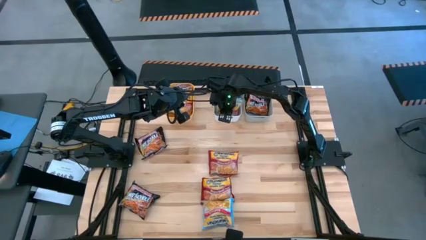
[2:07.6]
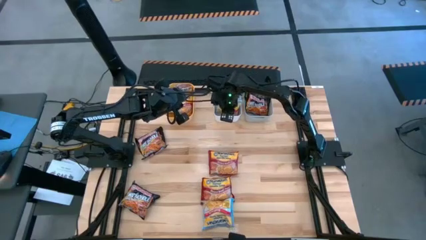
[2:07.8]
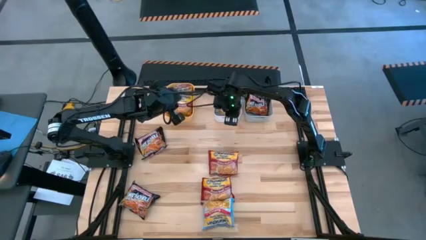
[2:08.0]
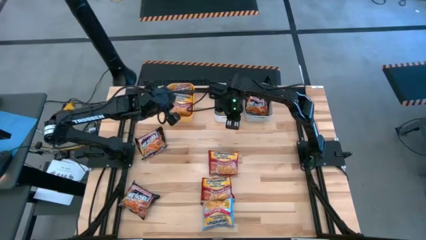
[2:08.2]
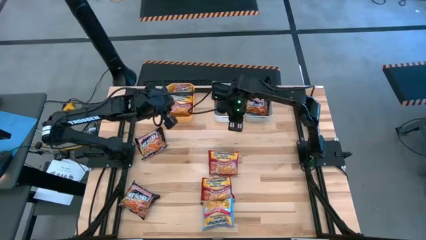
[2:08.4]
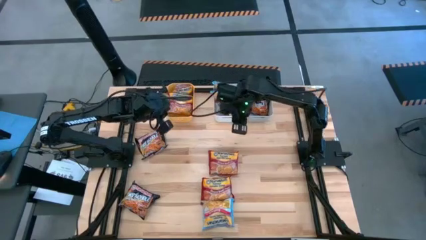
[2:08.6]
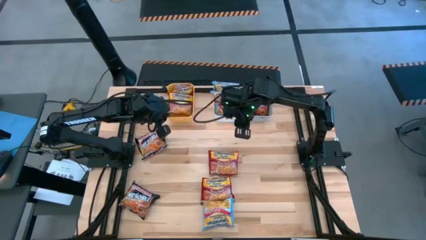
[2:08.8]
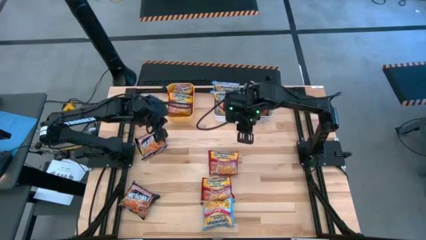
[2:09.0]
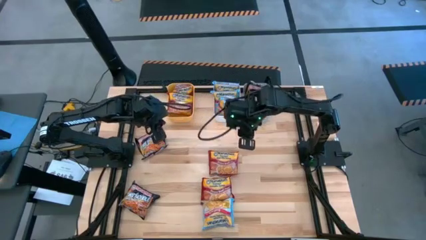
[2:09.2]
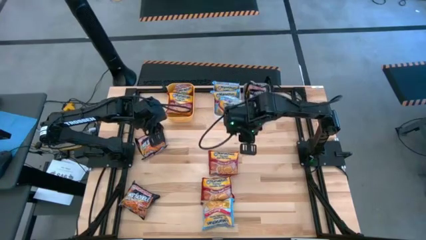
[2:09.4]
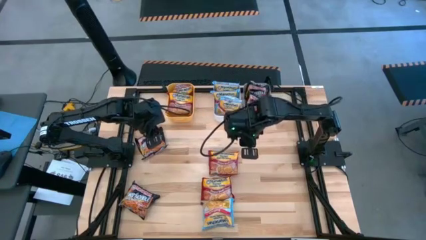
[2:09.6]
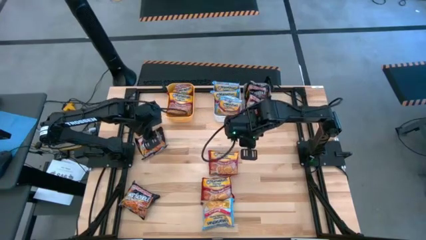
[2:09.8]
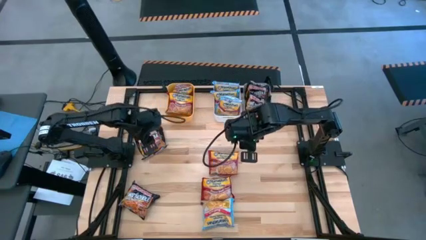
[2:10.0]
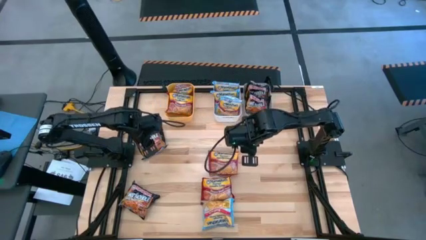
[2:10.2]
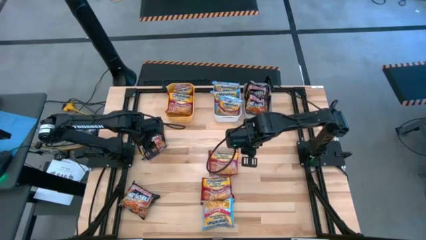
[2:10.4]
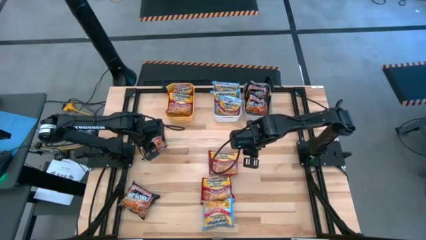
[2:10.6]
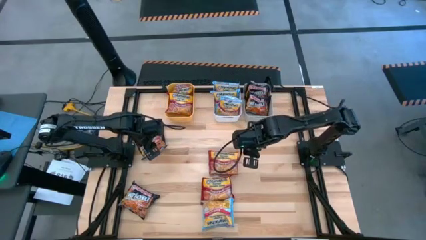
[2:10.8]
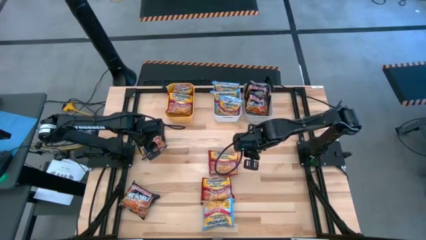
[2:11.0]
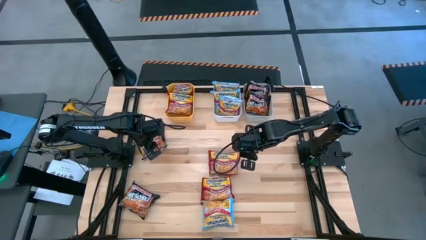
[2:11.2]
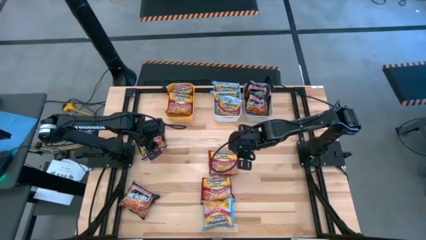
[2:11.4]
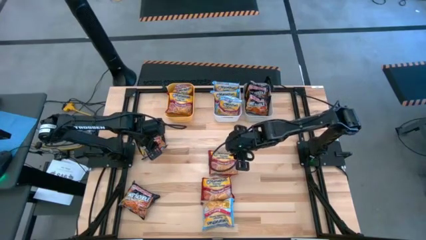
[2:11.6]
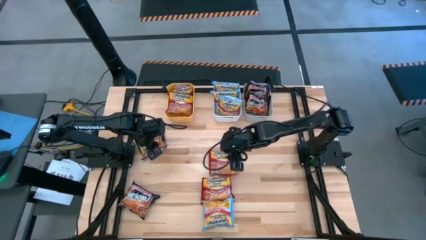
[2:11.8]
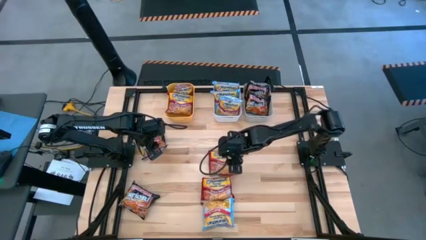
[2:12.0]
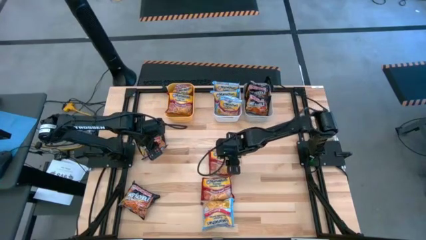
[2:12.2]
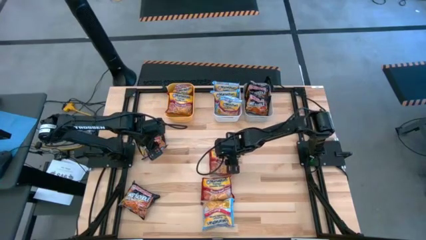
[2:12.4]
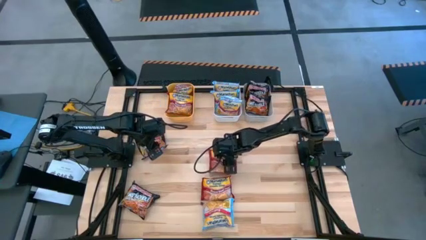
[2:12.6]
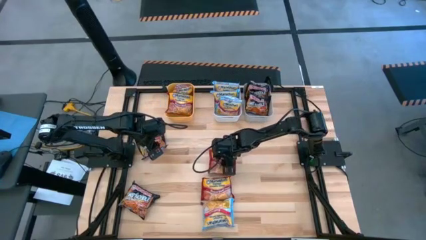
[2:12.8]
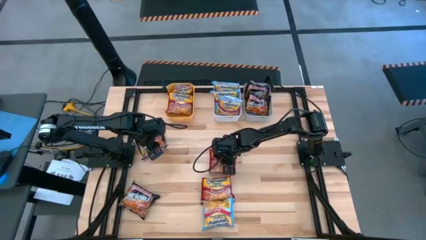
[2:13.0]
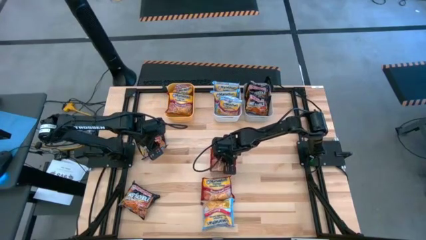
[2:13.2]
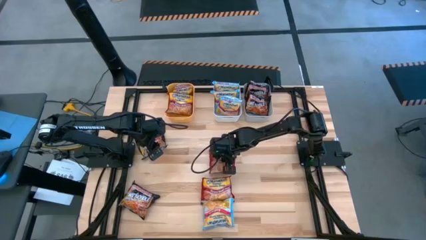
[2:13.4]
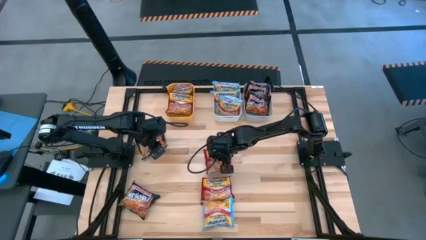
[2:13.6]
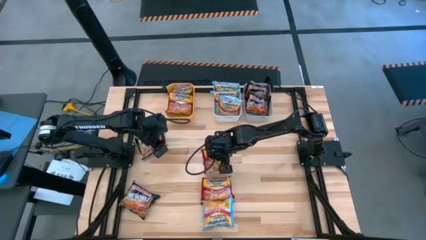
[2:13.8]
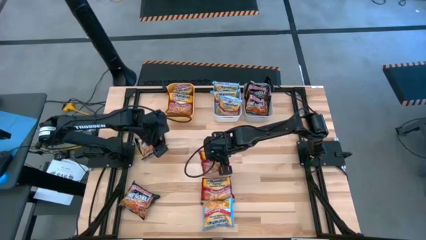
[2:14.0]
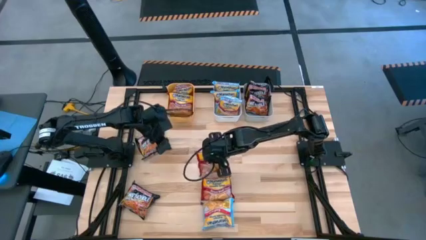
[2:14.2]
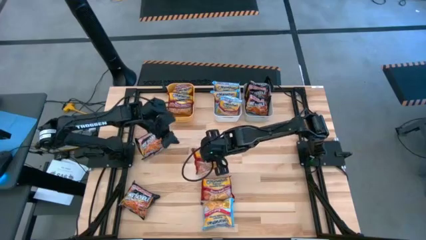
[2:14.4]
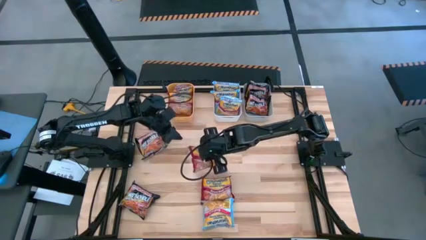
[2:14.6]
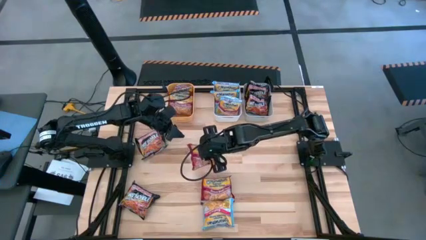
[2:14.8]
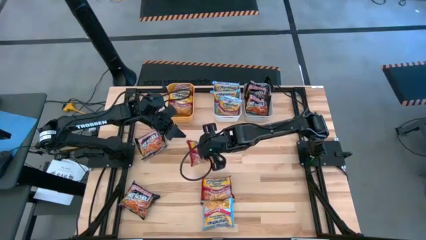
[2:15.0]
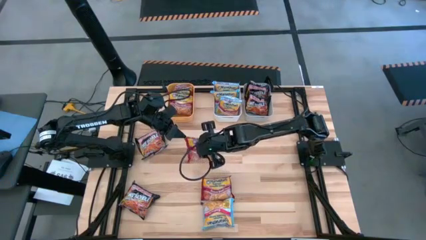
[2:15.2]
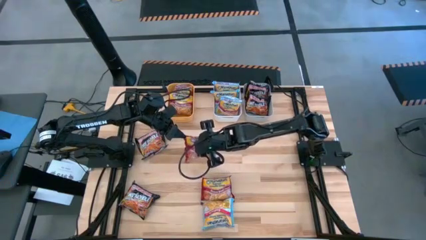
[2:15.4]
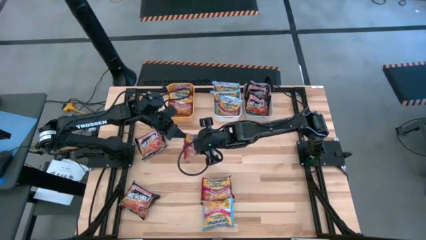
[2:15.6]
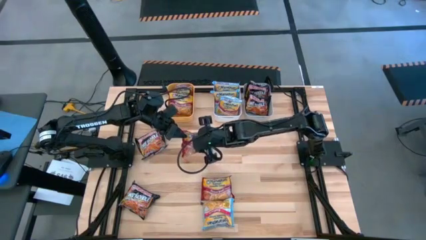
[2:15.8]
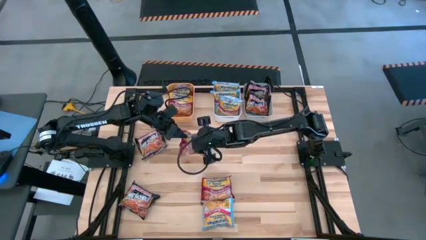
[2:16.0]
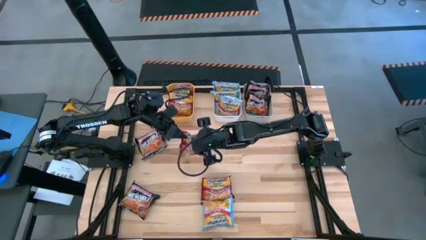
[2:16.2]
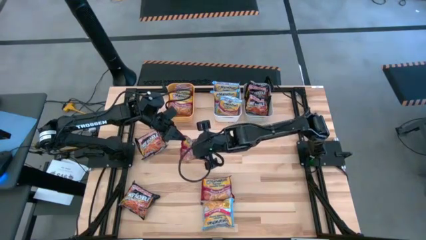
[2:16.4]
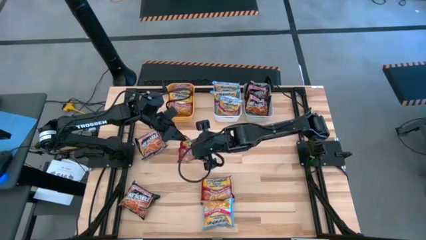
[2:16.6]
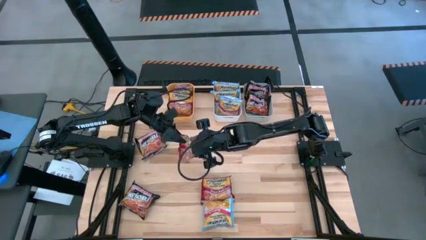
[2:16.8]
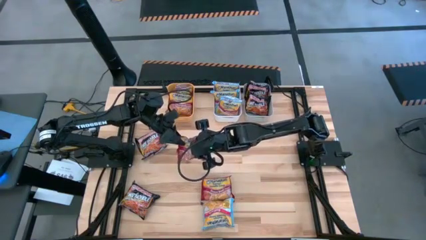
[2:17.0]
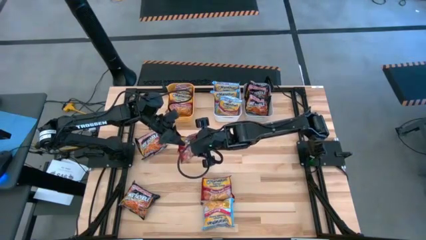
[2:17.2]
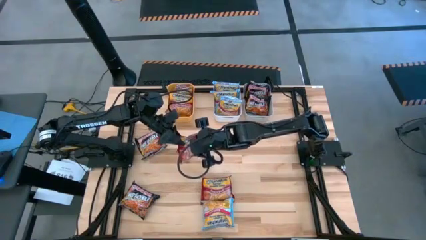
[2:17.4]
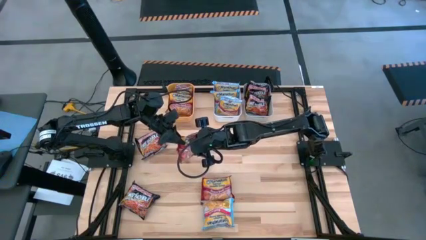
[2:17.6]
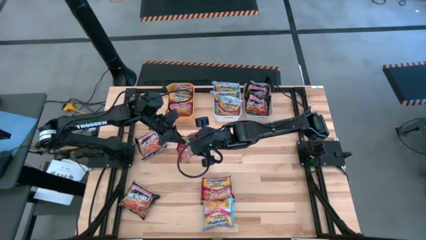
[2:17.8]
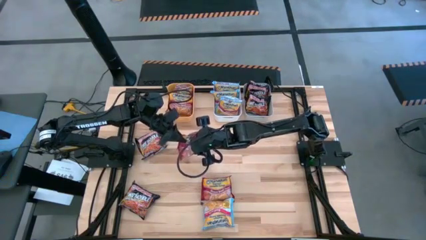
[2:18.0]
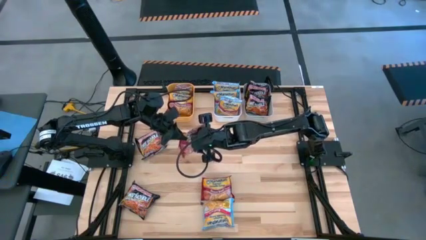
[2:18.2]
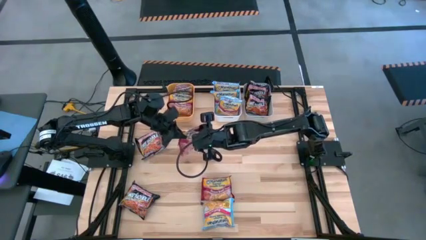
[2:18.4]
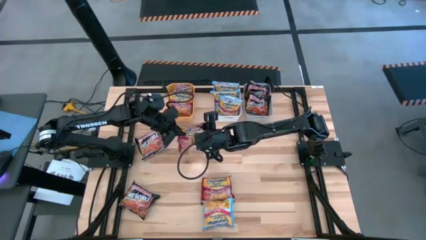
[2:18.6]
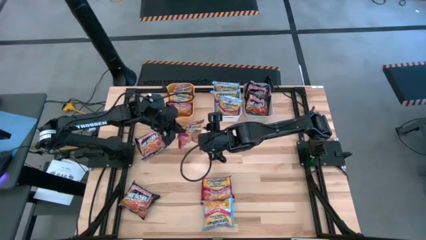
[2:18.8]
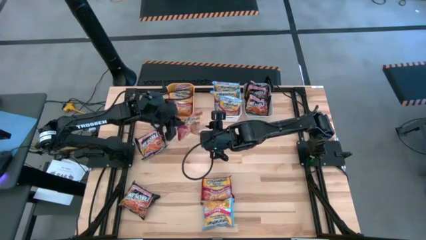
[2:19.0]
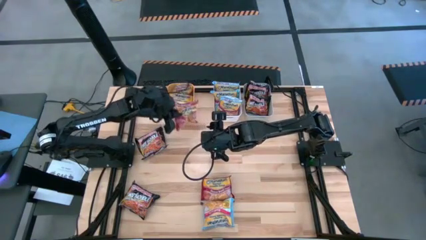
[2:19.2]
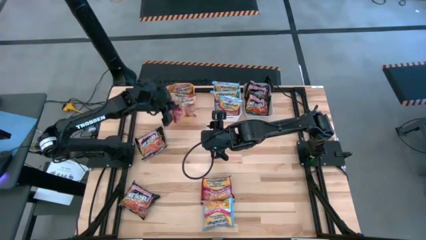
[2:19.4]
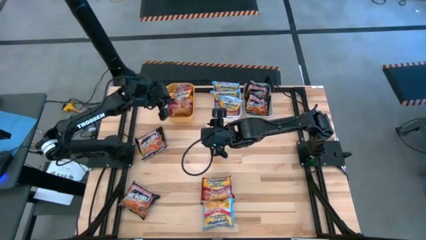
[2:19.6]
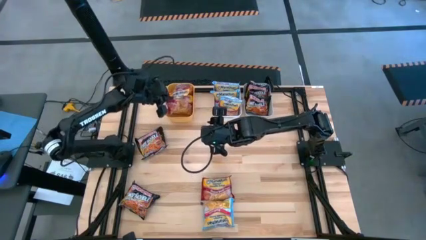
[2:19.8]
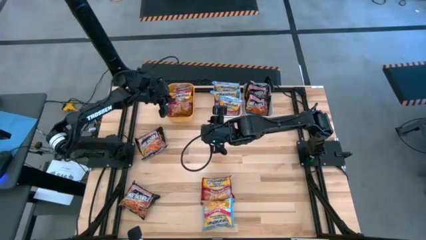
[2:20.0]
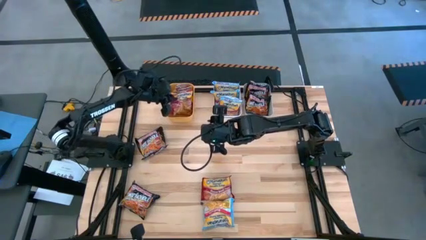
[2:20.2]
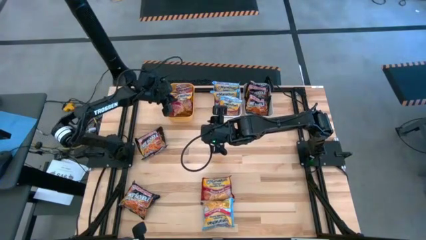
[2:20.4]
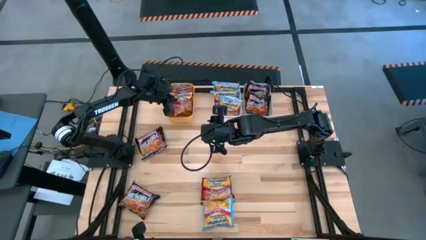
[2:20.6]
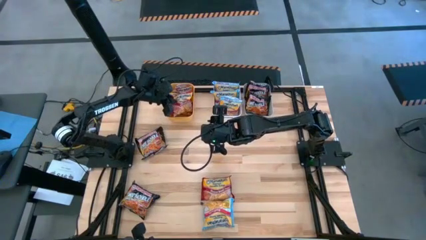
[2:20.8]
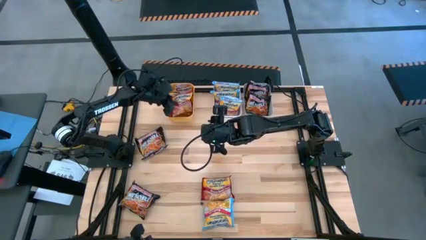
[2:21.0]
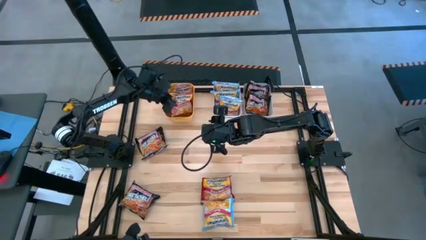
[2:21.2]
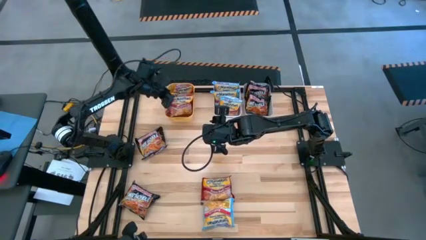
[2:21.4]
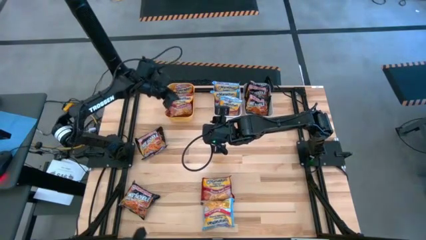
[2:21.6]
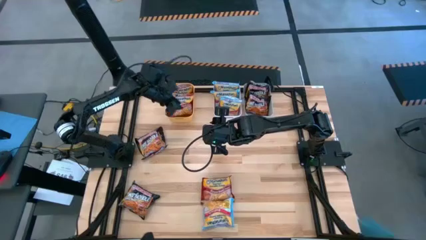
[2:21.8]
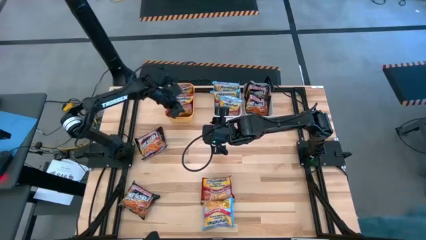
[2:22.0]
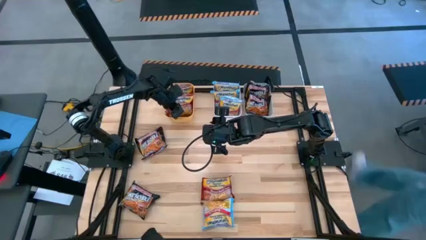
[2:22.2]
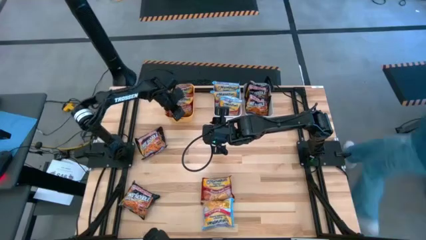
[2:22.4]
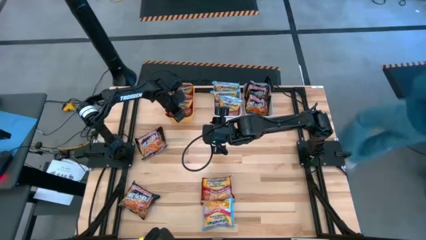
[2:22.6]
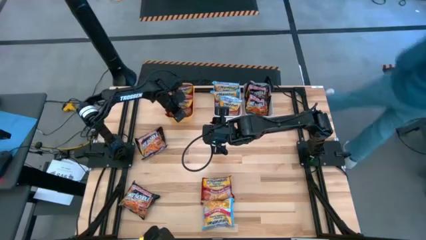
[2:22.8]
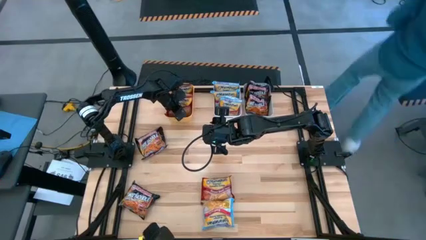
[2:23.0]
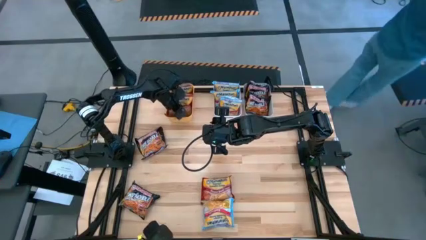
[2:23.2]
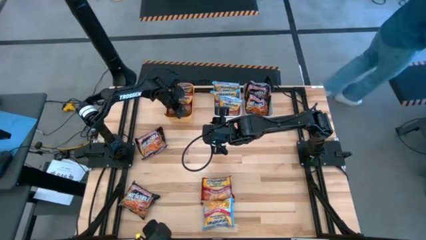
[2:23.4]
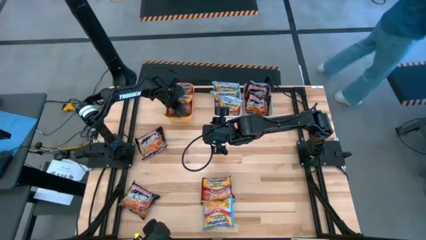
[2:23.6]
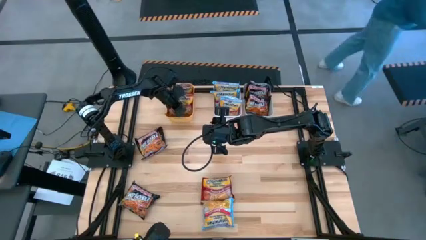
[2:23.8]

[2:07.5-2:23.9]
Task: Sort Maruchan noodles
Put the red noodle pack into the yellow bin

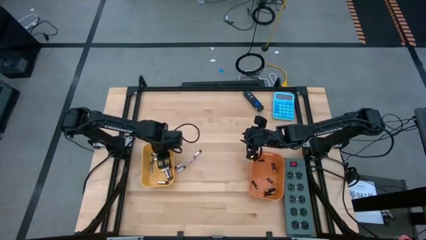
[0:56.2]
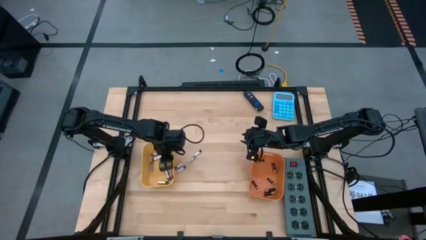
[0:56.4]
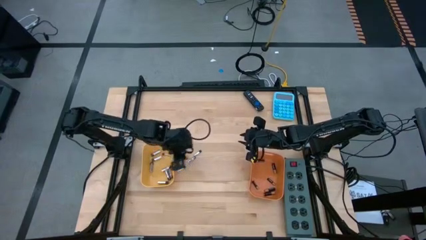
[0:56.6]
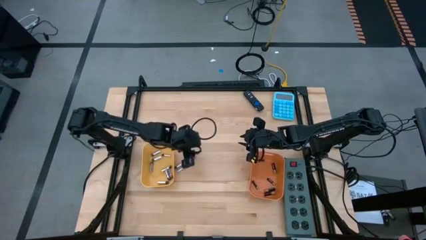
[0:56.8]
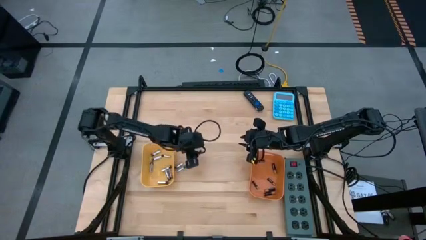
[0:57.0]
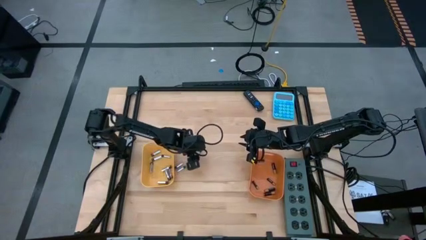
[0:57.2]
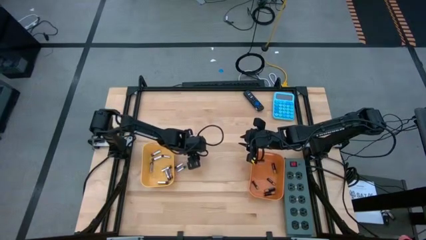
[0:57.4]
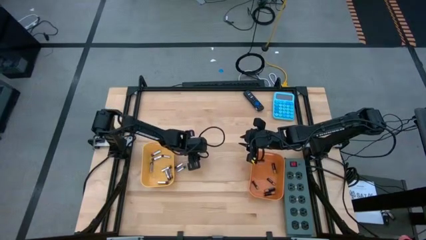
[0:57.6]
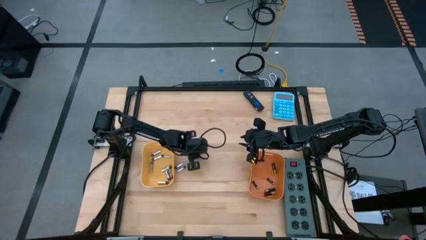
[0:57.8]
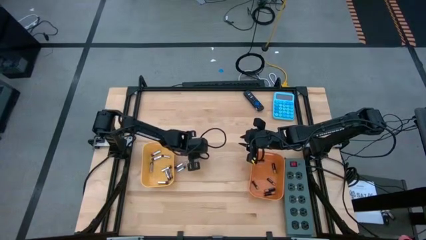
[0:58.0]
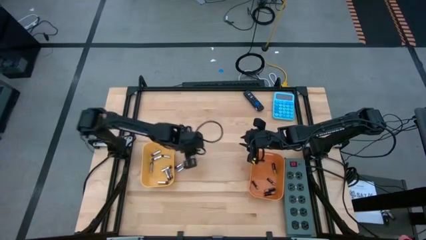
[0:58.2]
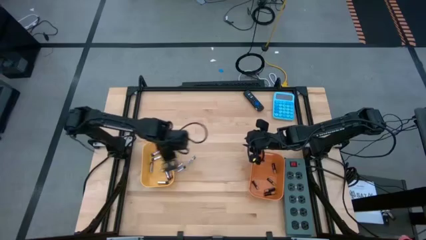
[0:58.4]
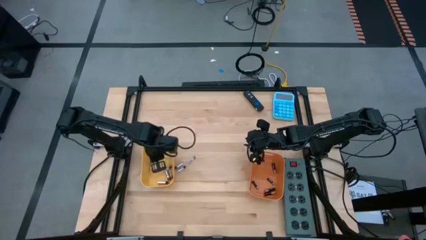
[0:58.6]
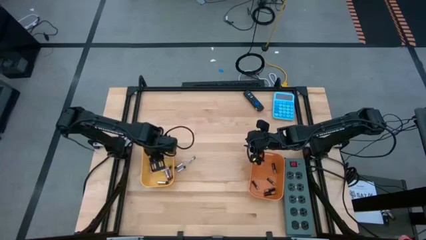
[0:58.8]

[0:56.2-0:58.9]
Task: Sort batteries
Put the silver battery into the yellow bin
